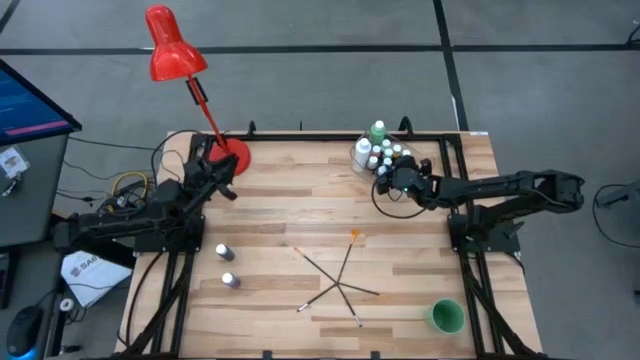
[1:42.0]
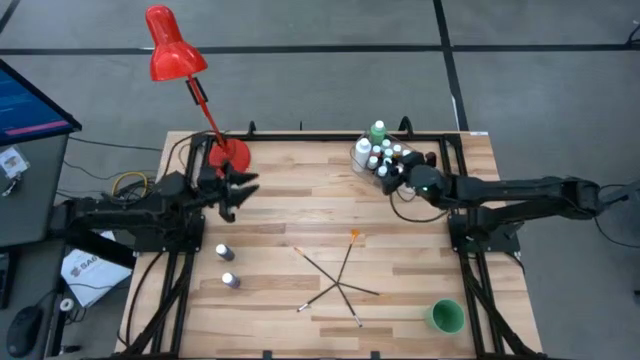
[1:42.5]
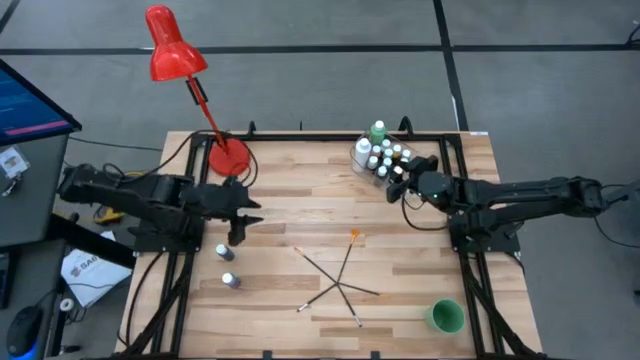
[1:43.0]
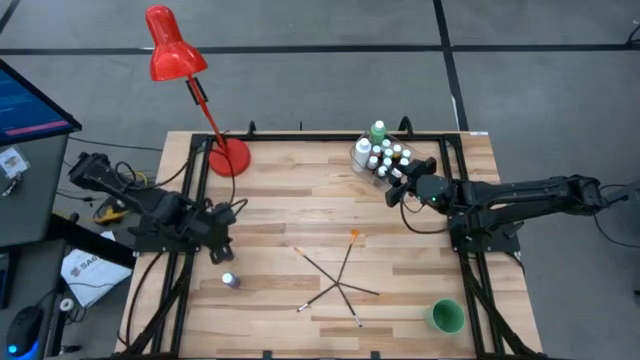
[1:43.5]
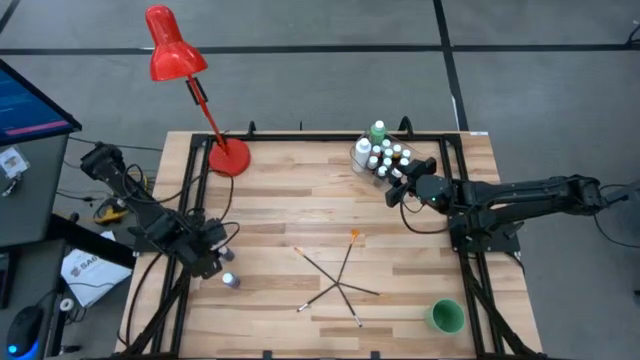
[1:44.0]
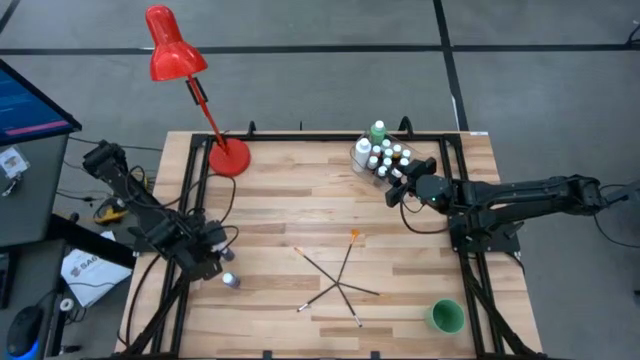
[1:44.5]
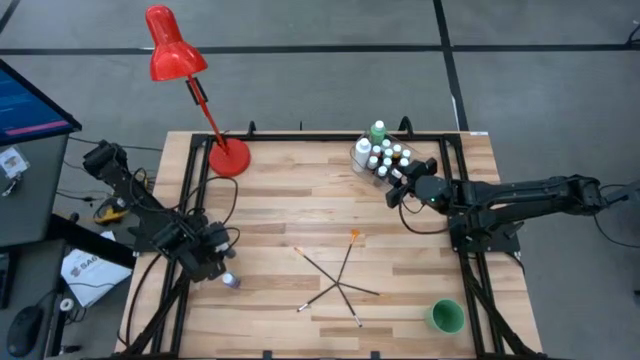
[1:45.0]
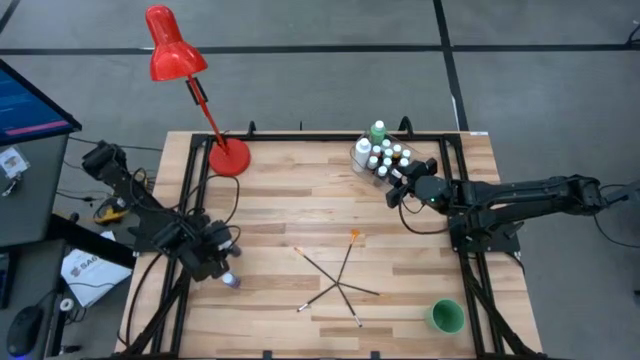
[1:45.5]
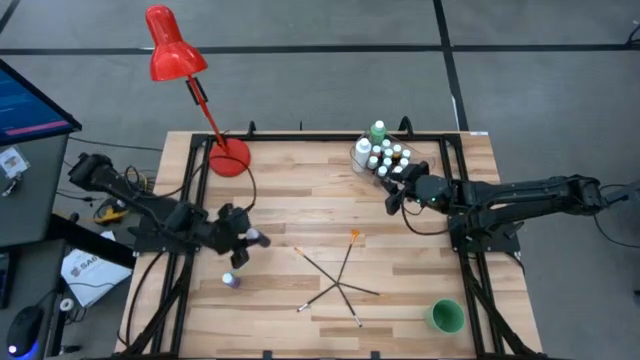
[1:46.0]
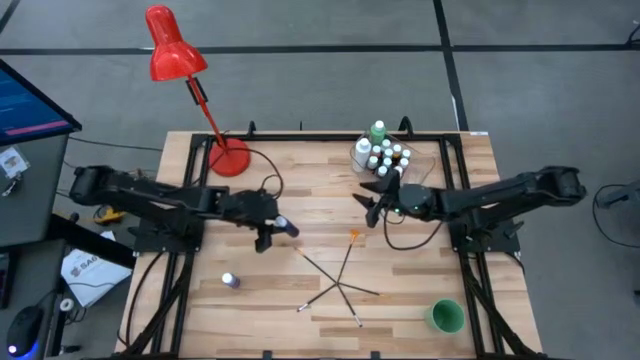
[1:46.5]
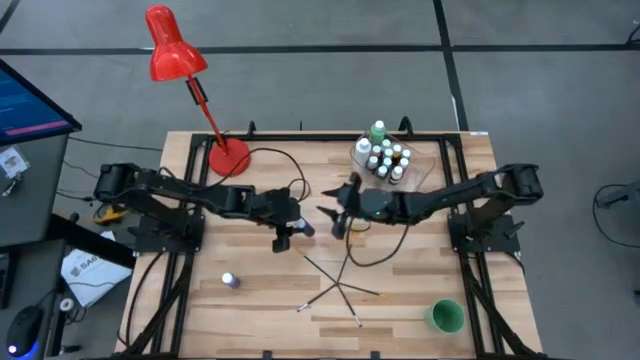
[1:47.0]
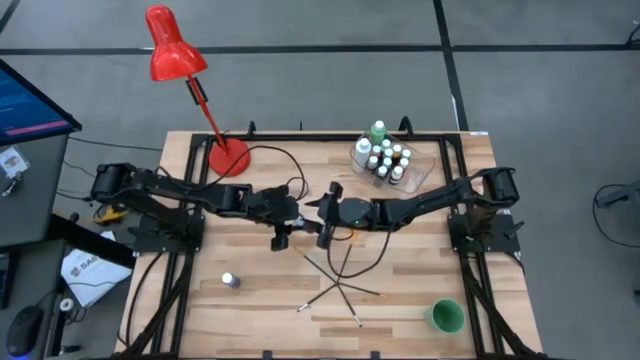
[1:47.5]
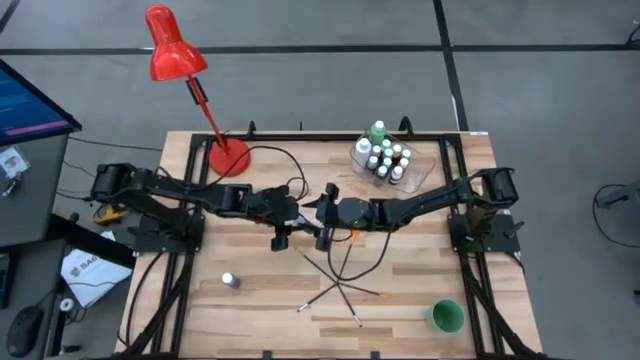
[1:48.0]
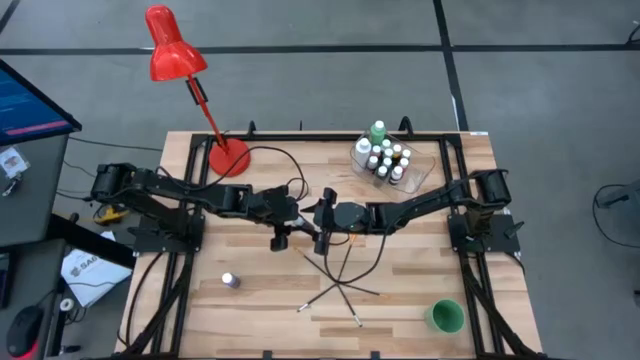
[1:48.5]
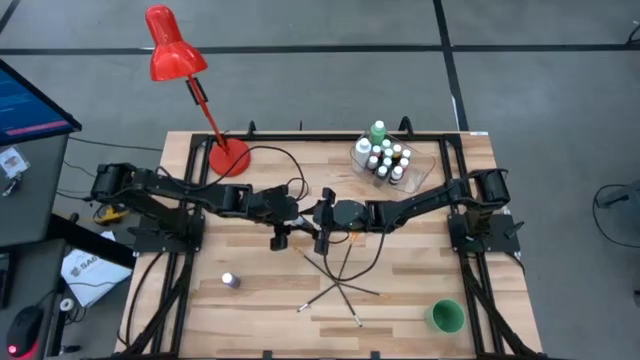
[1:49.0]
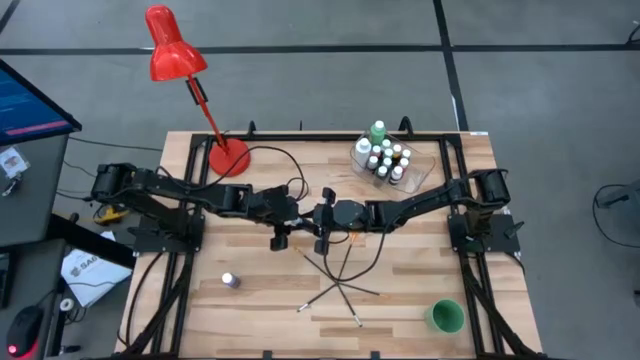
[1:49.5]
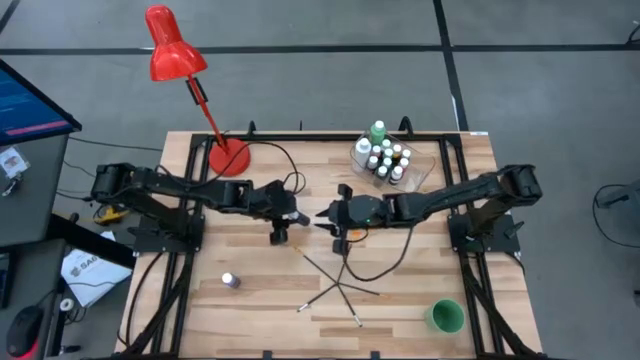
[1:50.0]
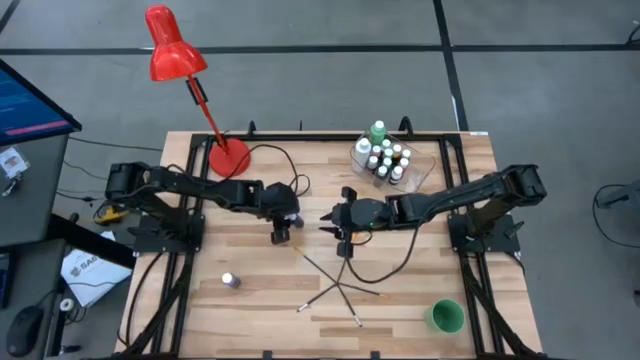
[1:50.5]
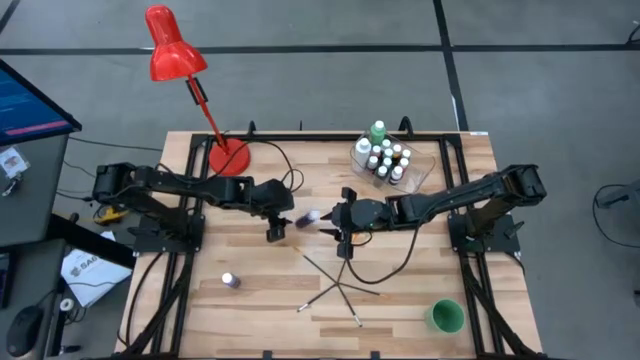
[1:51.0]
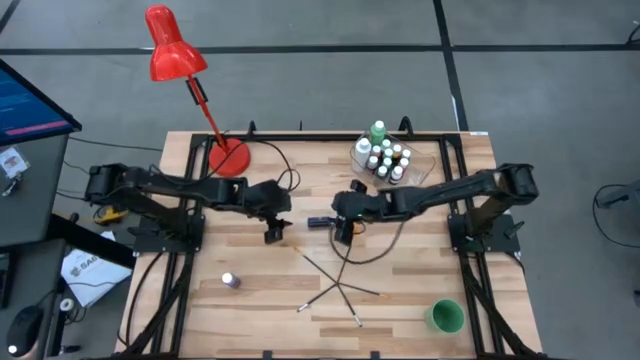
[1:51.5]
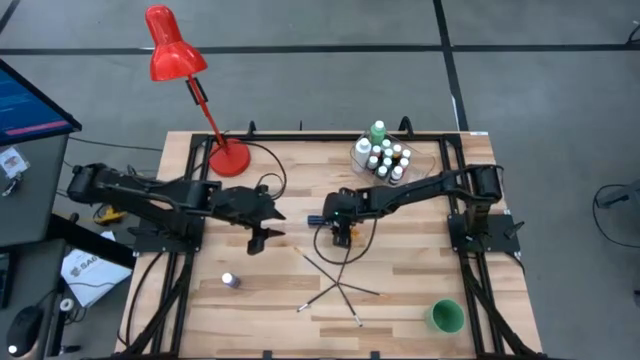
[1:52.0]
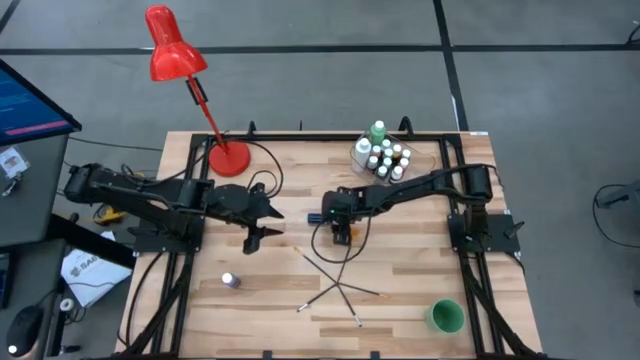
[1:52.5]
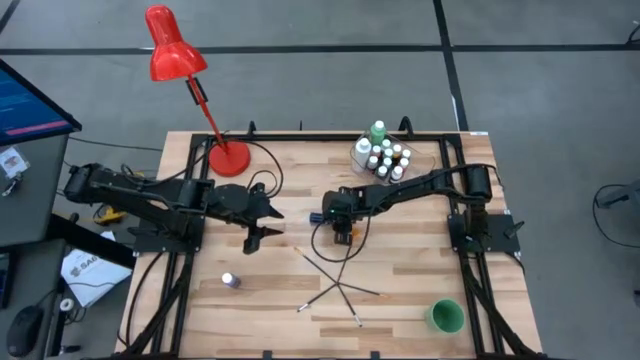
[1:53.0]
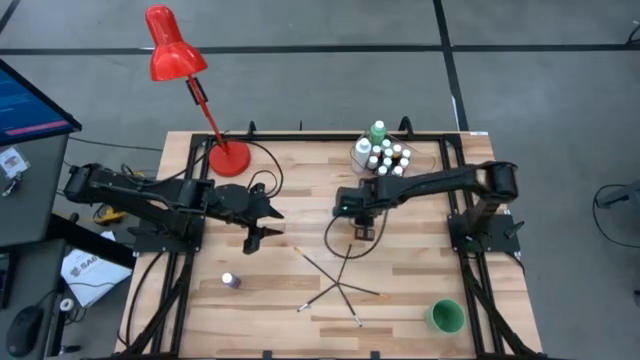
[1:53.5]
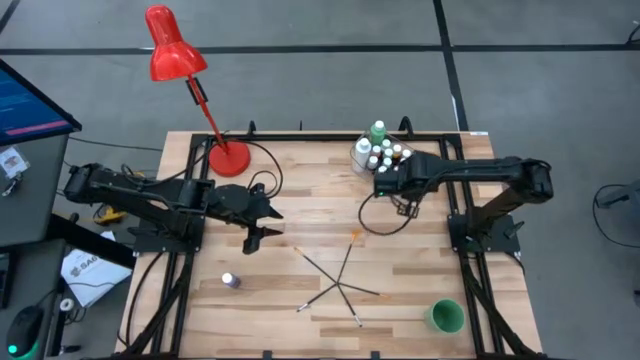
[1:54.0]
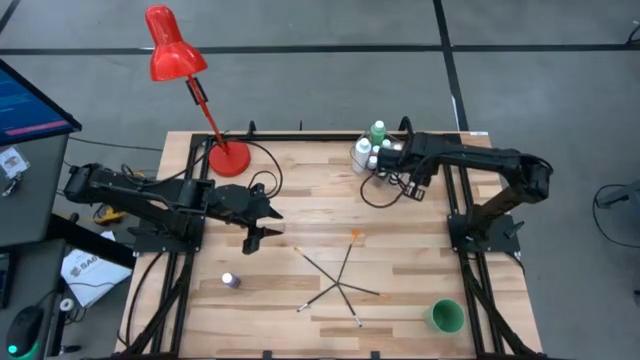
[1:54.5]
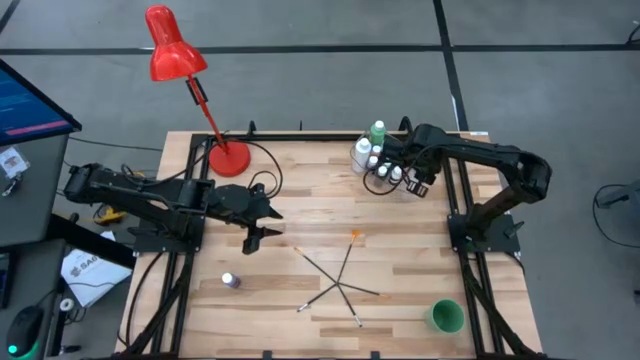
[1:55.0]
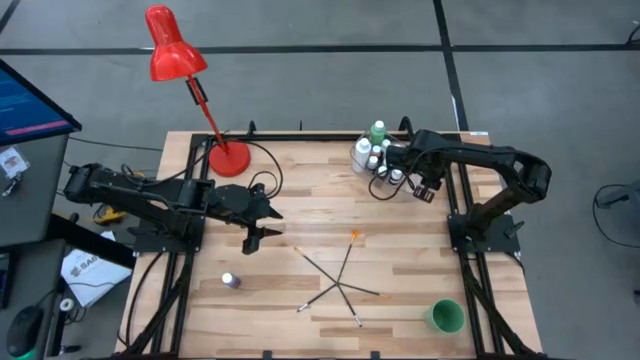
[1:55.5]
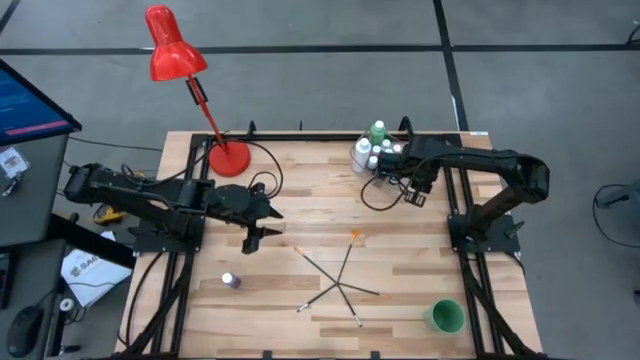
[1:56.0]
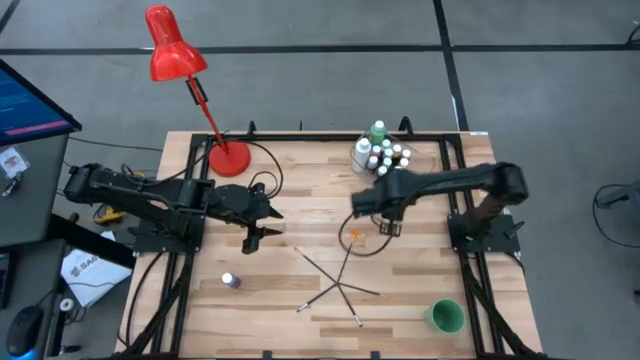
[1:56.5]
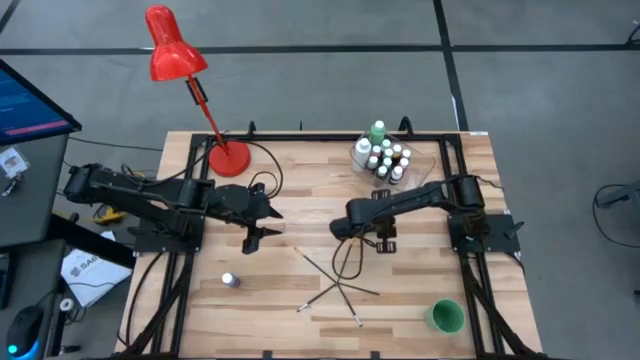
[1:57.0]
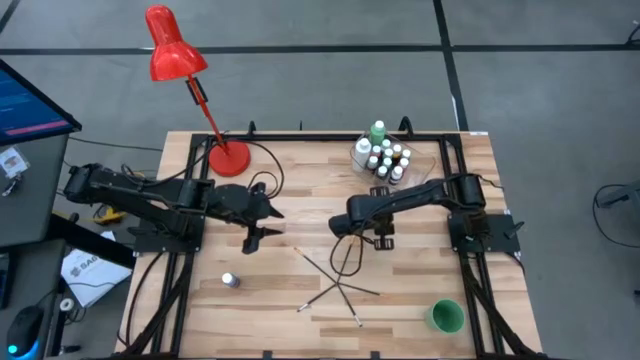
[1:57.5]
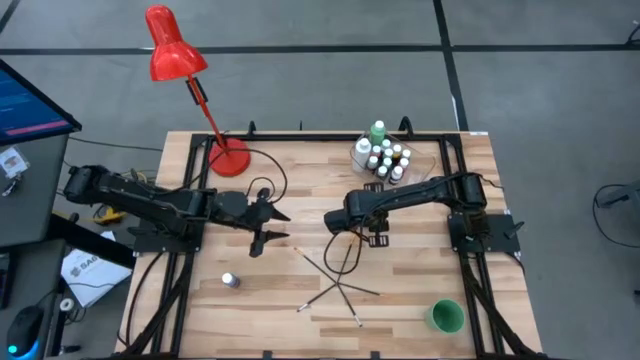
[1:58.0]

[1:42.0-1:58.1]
Task: Pick & Place Paint Supplies
Put the small dark blue paint bottle into the transparent bin

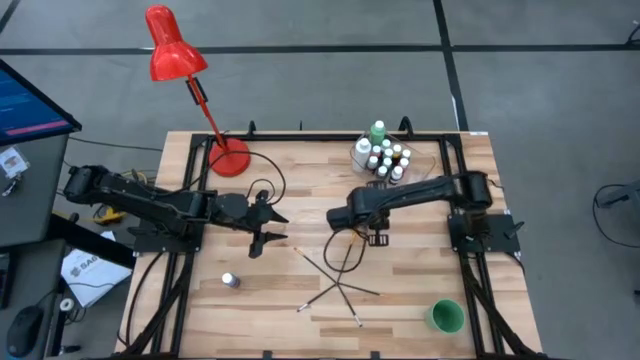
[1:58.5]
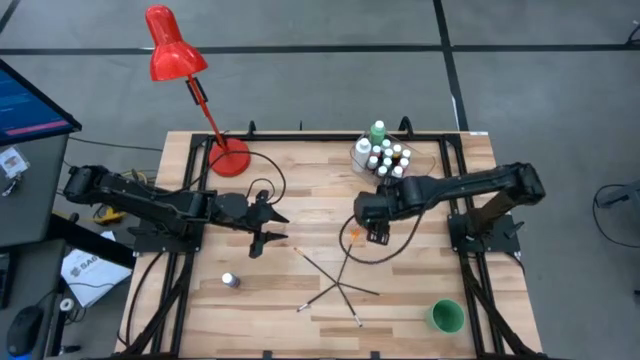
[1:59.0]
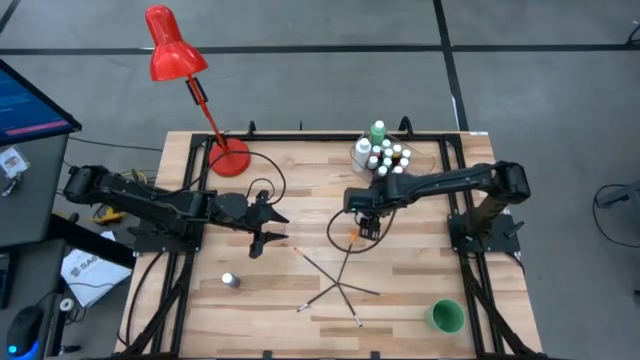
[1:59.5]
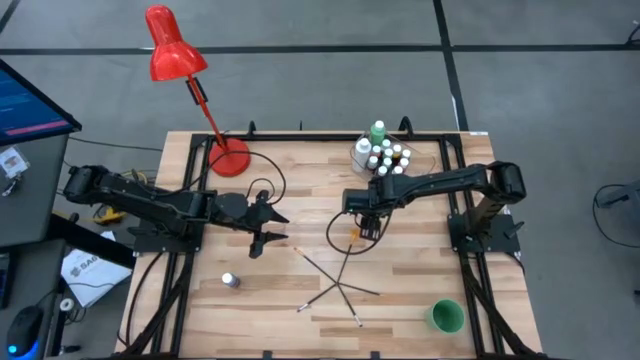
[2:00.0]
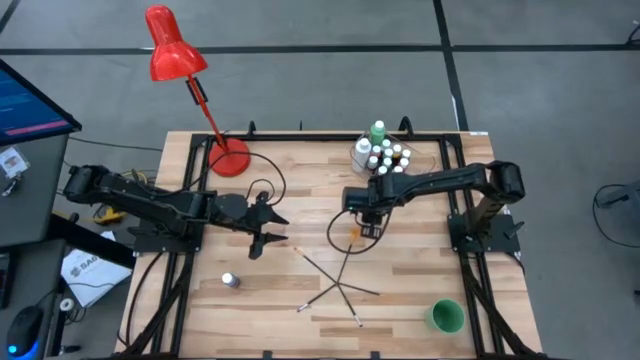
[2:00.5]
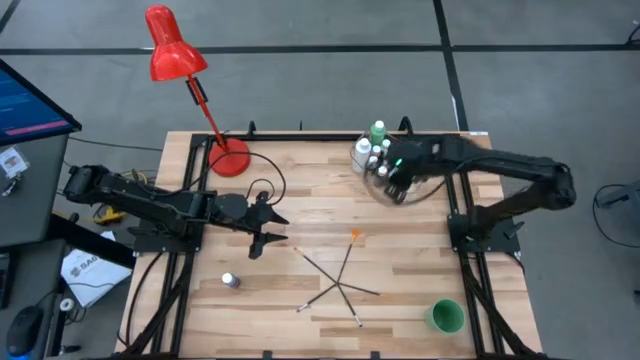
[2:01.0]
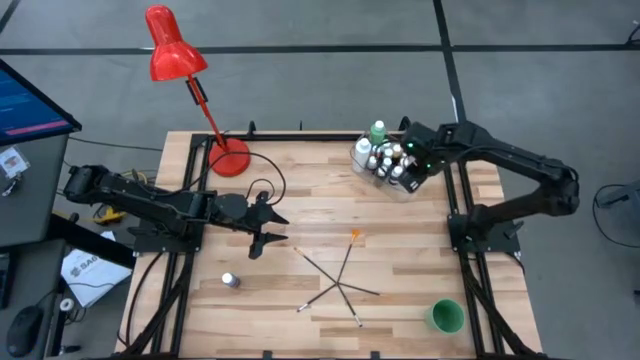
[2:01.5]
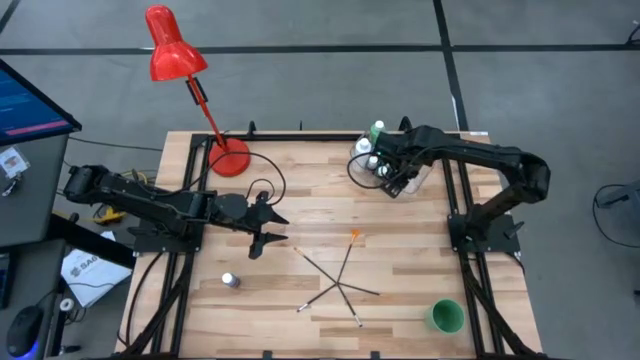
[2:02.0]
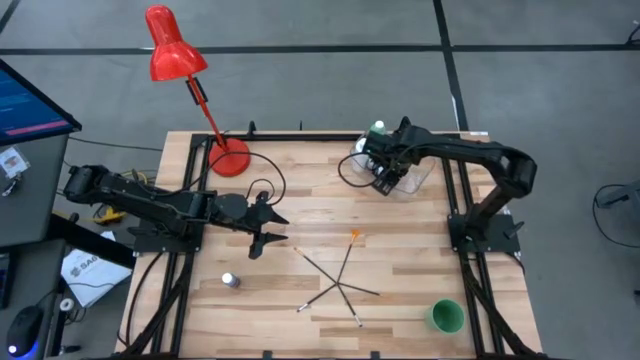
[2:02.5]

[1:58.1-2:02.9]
Put the small dark blue paint bottle into the transparent bin

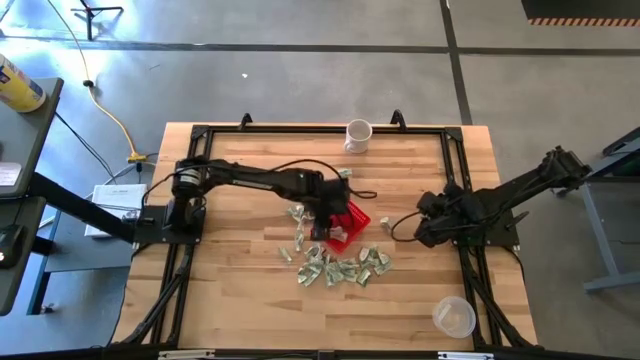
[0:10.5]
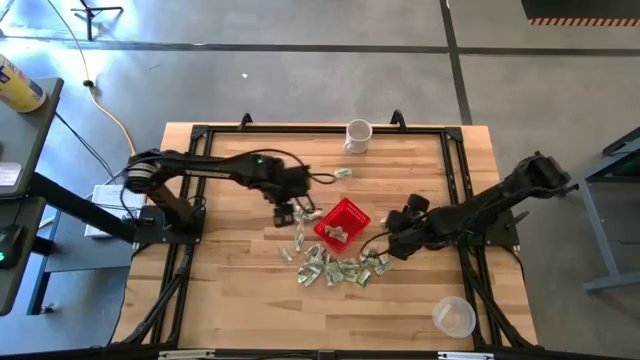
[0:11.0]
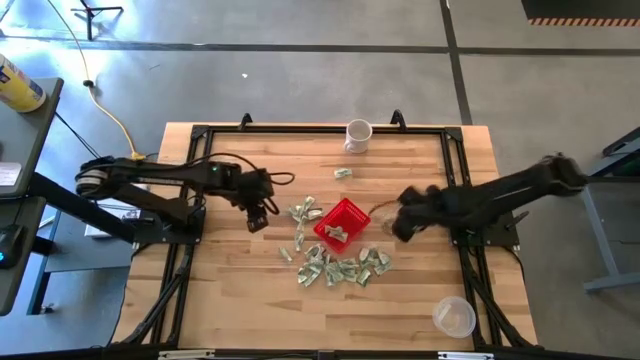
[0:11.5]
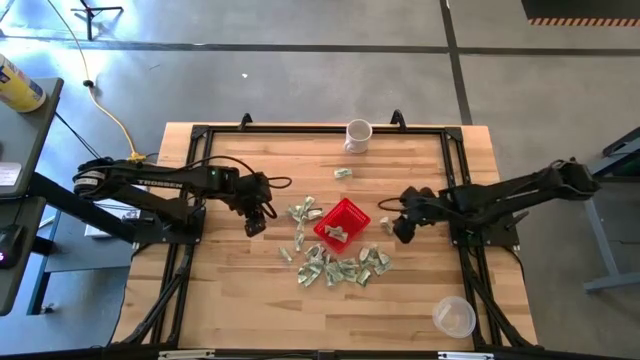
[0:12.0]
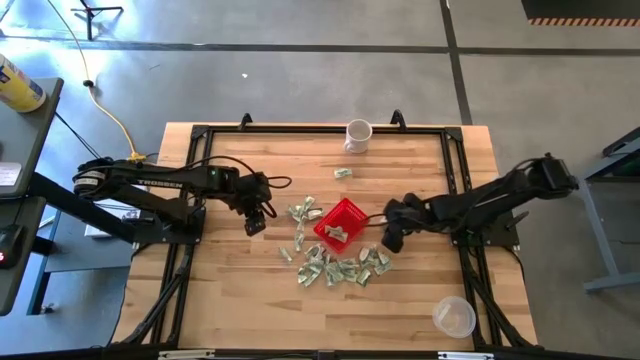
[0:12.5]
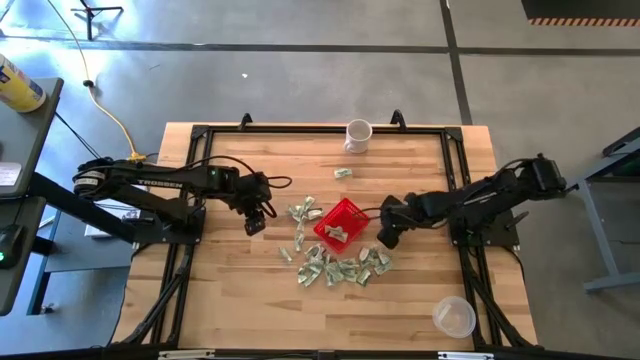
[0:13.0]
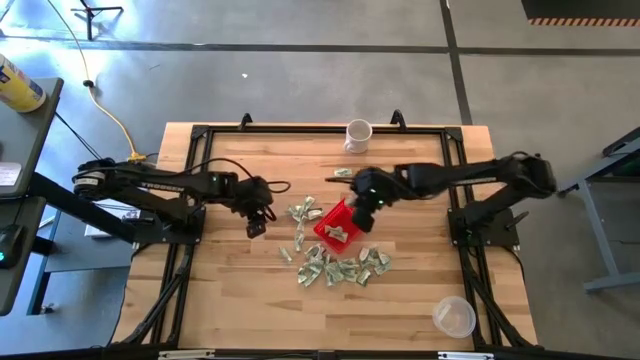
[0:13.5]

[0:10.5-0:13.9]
Task: Pick and place items into bin
Put the white stevia packet into the red bin
